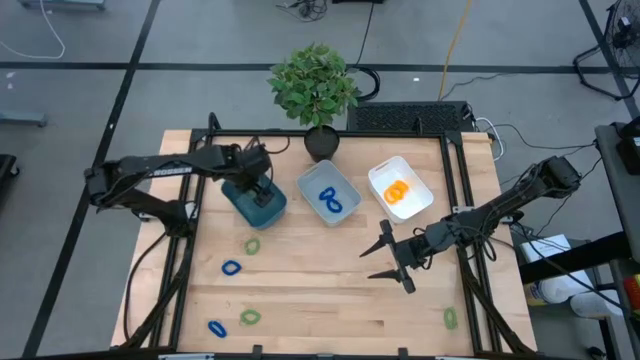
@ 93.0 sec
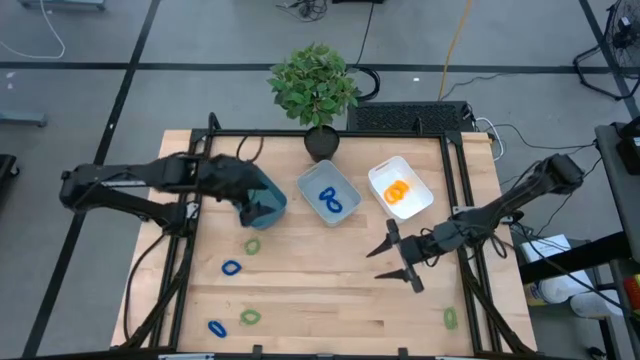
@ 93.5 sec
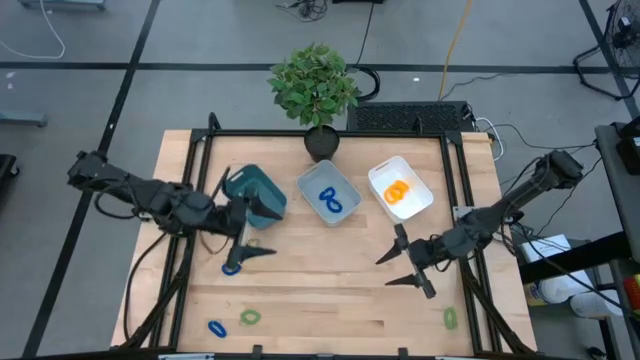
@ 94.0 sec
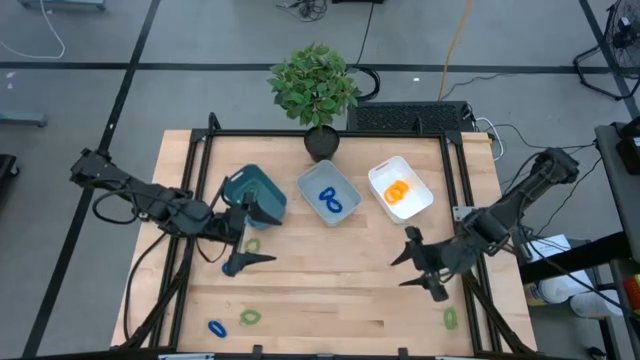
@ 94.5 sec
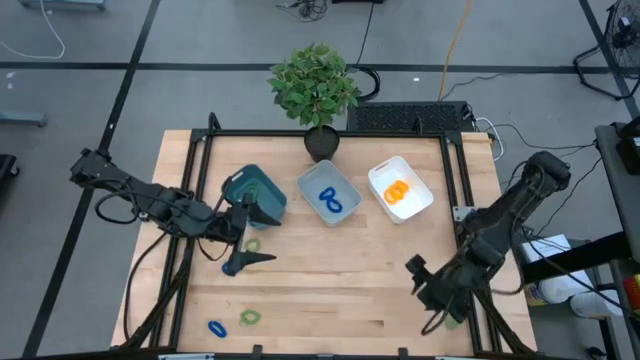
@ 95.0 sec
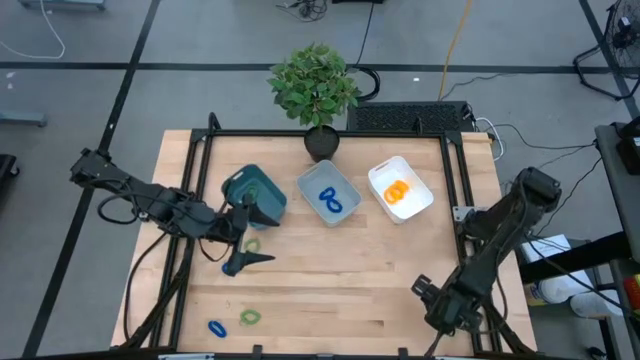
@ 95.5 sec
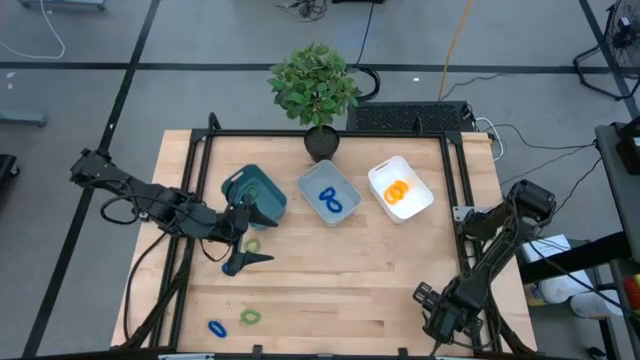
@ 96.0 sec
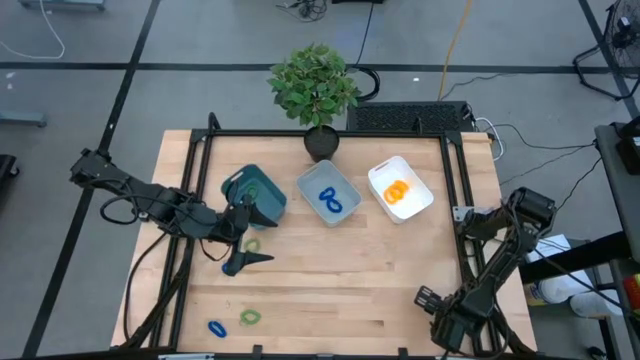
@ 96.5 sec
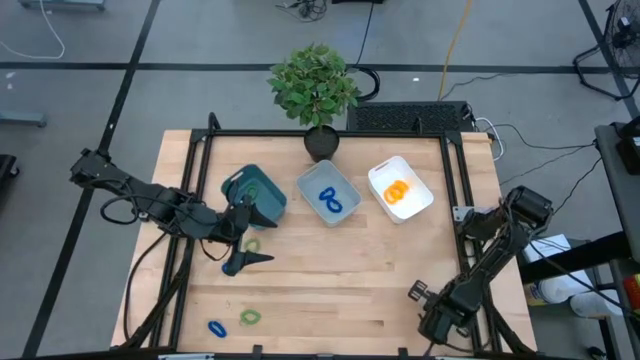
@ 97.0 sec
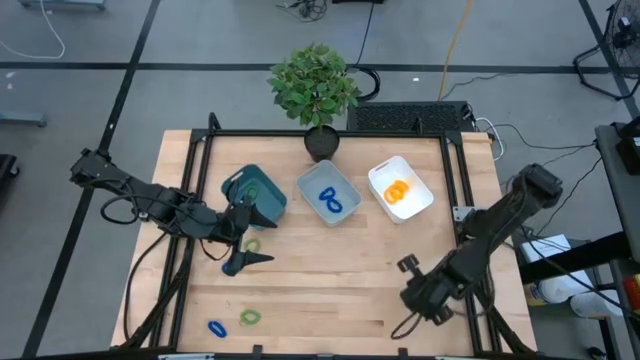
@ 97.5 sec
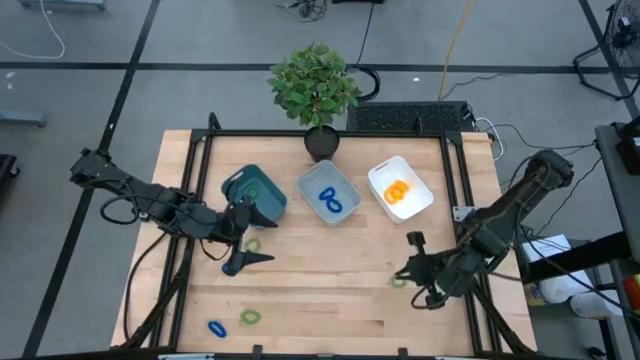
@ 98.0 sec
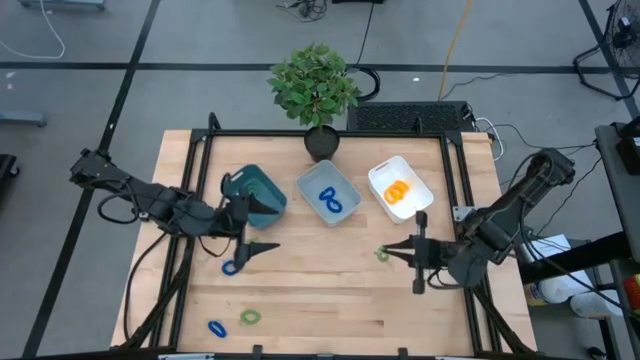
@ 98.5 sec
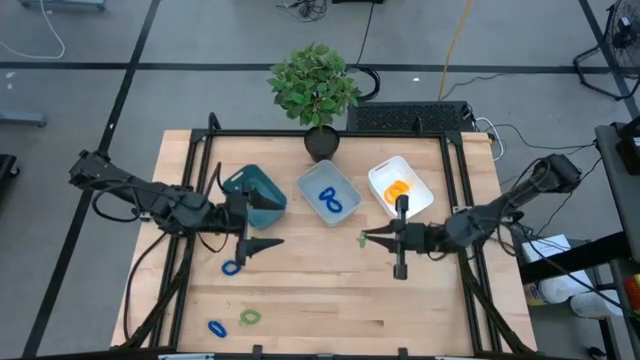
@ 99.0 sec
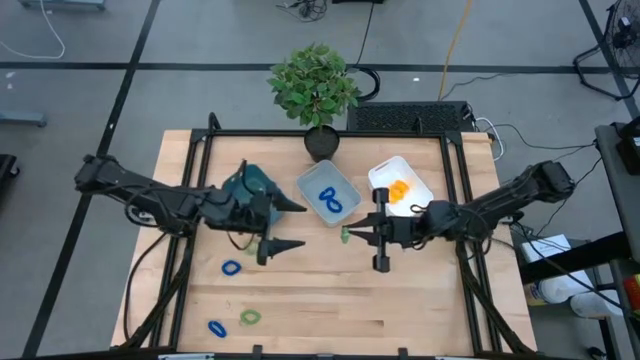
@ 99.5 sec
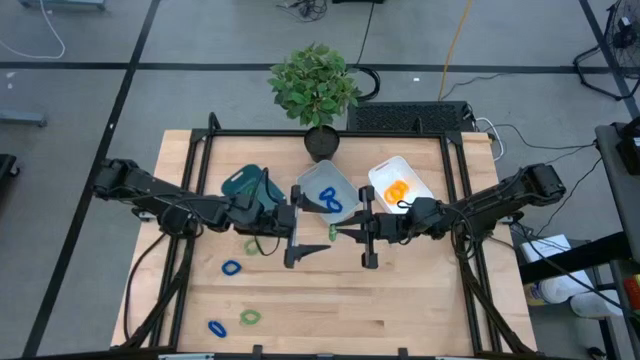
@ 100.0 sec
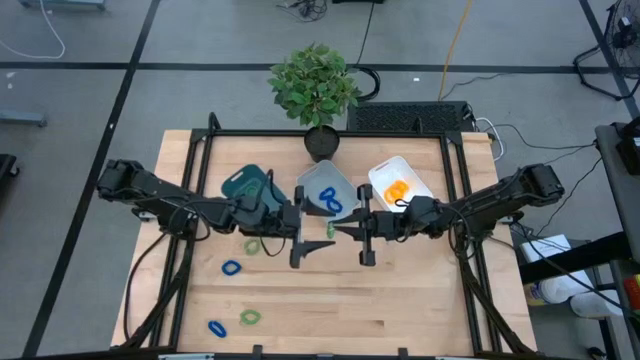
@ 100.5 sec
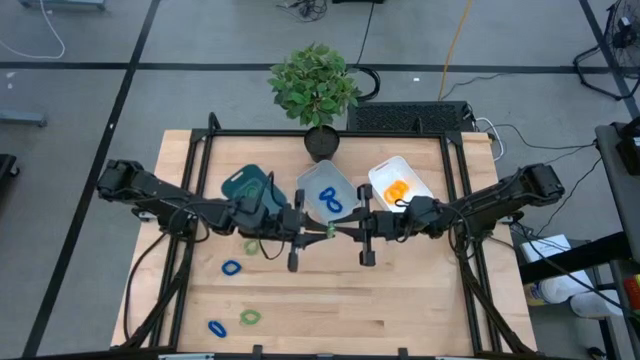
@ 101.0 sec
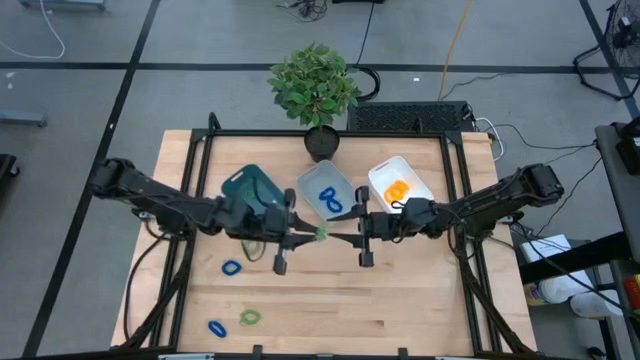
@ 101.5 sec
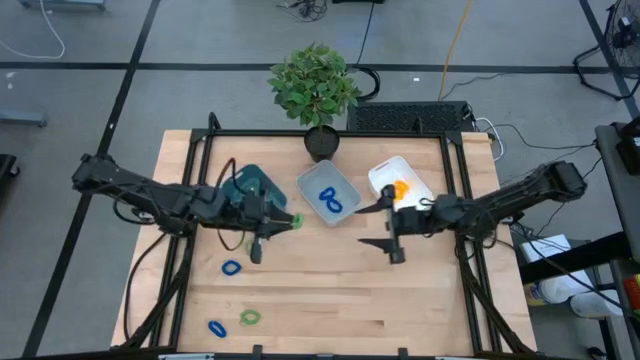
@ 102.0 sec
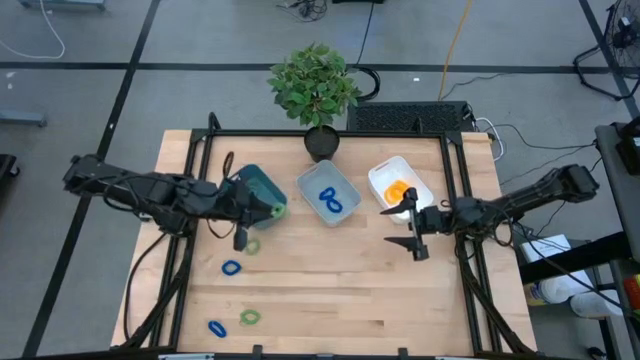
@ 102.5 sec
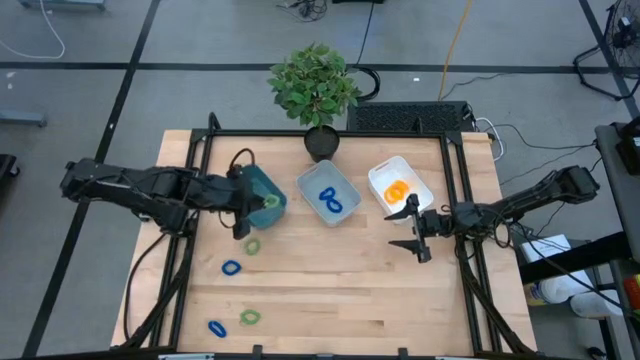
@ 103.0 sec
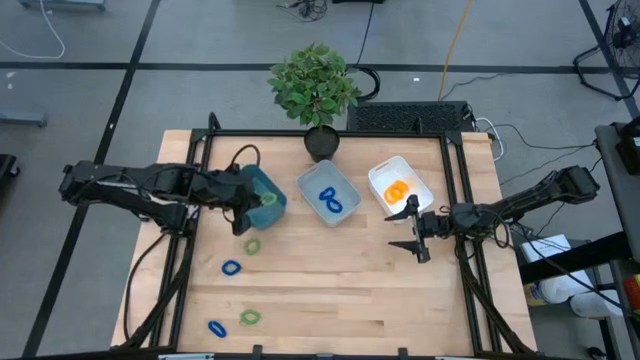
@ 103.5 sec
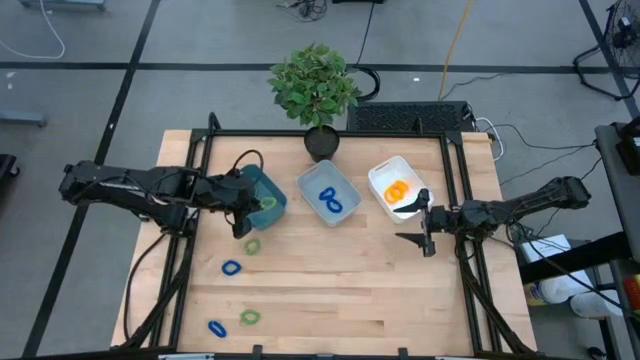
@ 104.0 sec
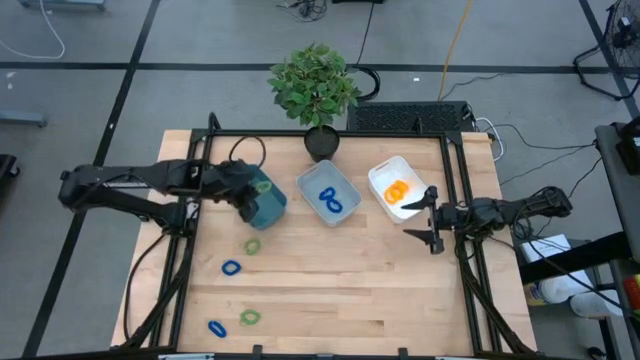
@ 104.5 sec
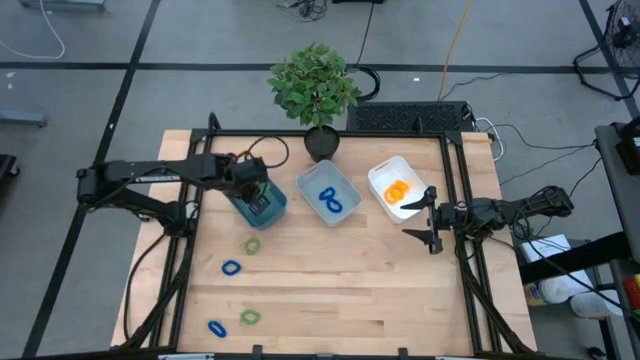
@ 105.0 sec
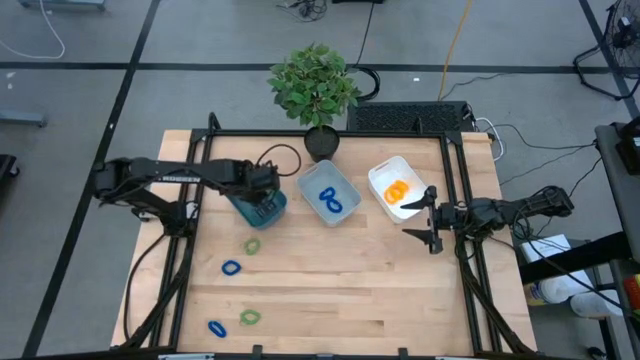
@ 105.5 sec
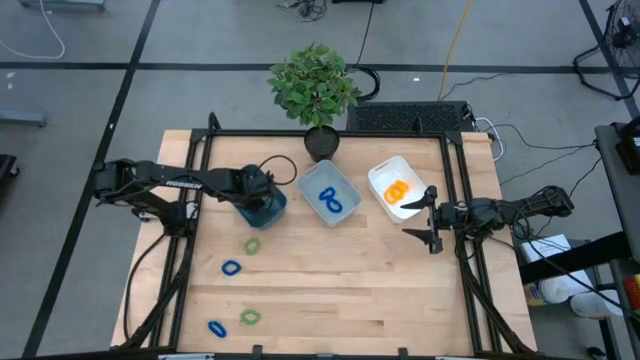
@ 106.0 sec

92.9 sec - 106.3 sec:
Task: Sort spring keychains
Put the bottom right green spring keychain into the blue bin

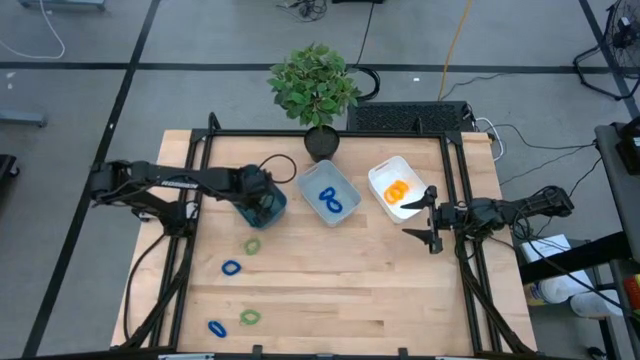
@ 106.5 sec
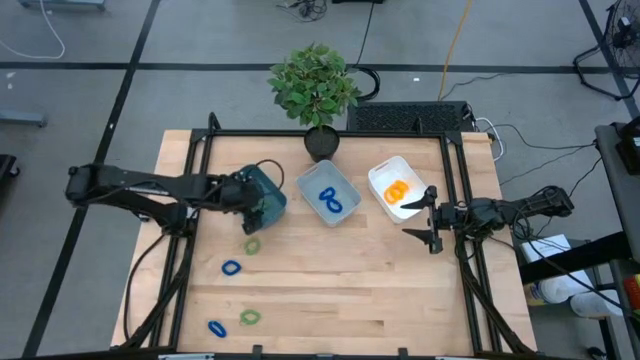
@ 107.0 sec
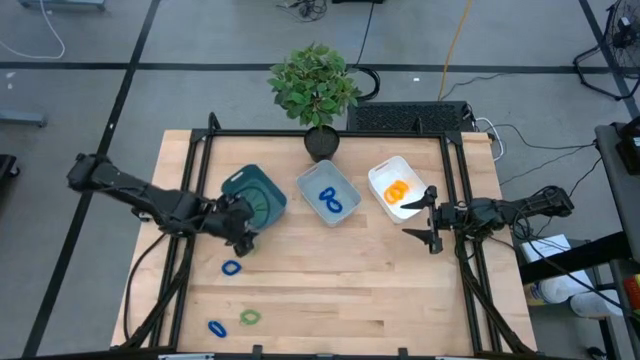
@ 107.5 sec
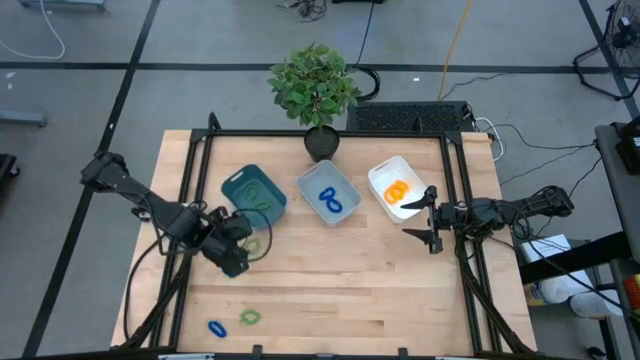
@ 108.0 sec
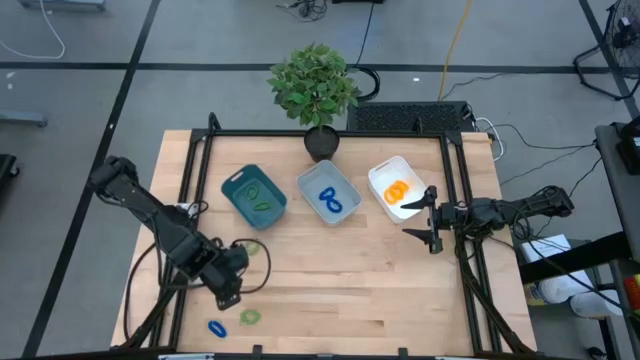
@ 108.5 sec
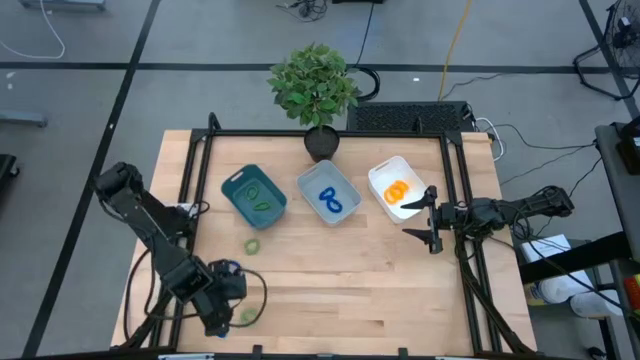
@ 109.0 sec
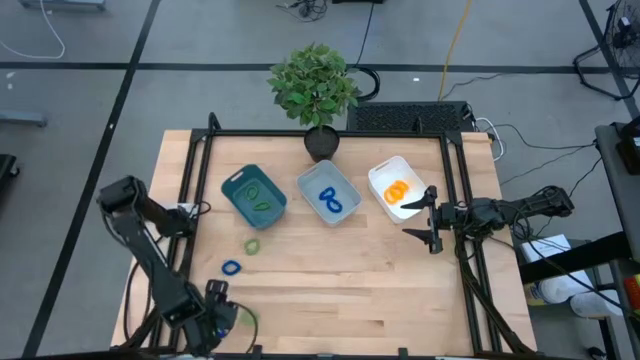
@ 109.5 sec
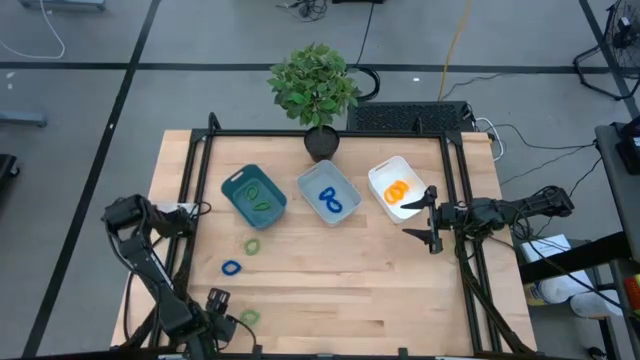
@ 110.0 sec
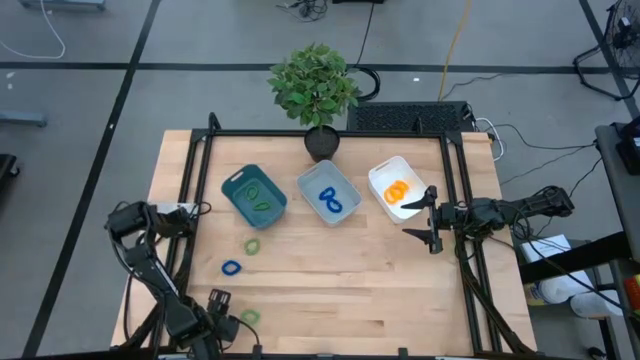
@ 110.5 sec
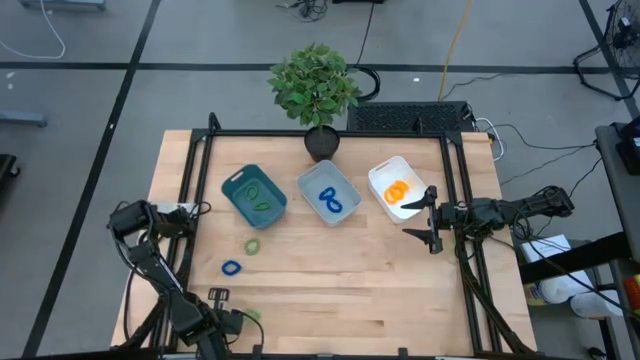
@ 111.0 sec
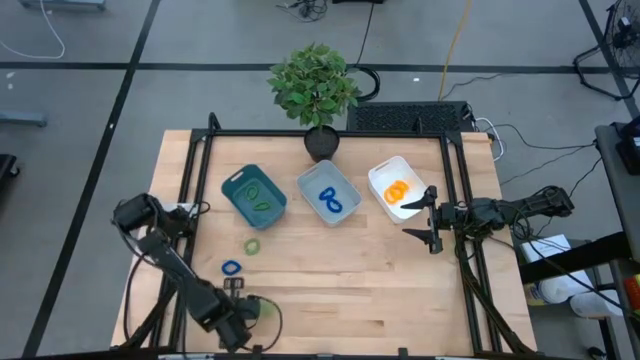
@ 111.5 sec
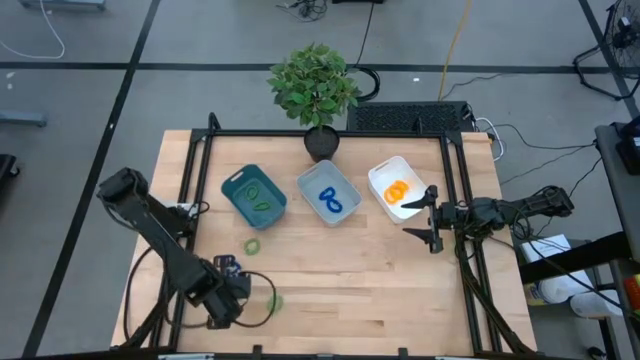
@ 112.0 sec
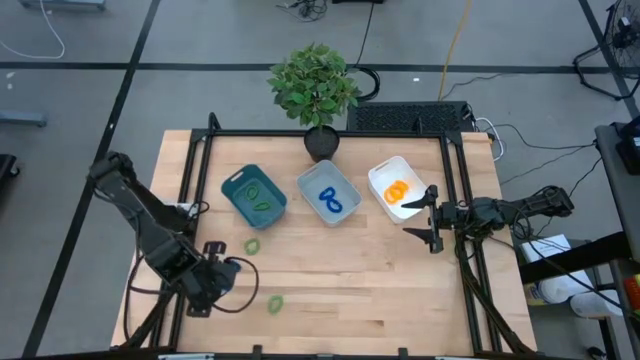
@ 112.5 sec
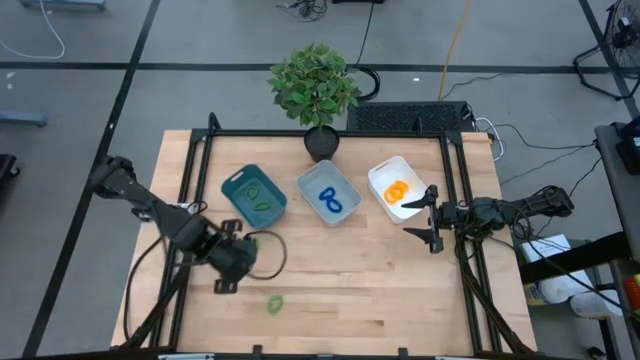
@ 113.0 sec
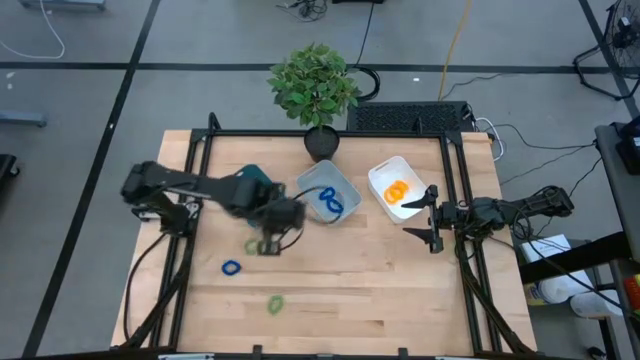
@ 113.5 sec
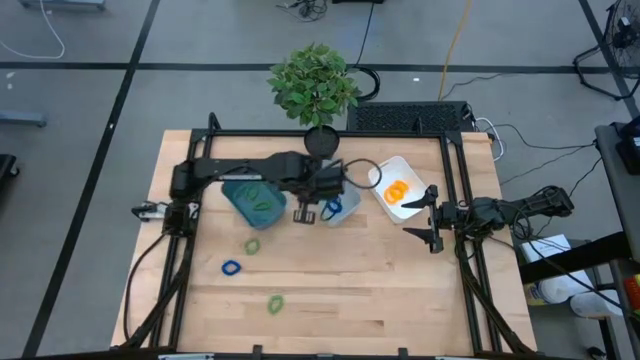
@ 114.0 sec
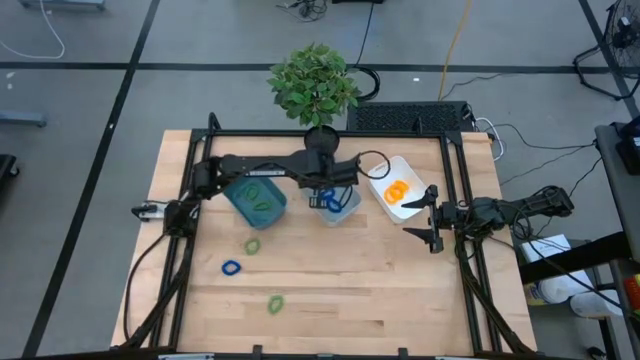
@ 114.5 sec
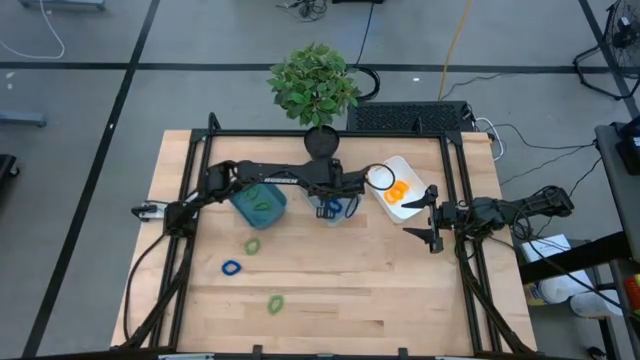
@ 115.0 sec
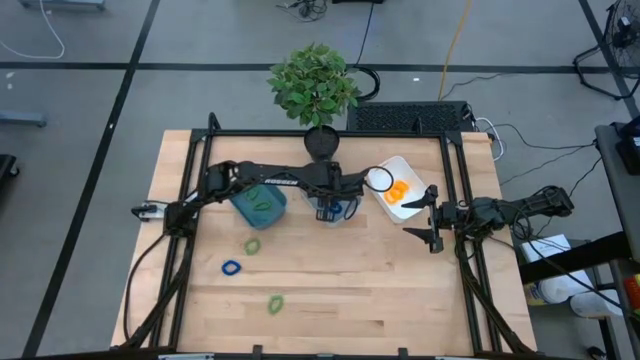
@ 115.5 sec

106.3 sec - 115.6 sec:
Put the bottom blue spring keychain into the gray bin
